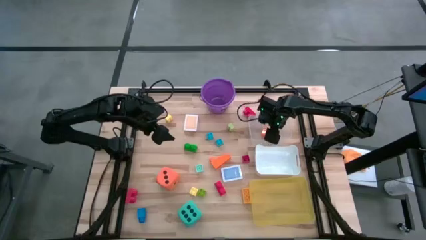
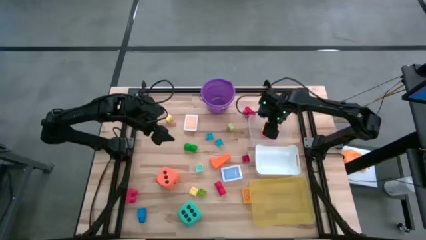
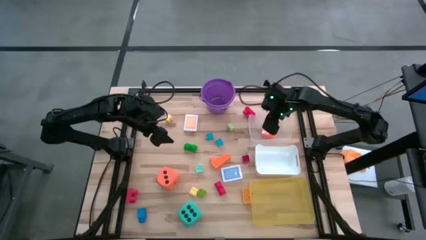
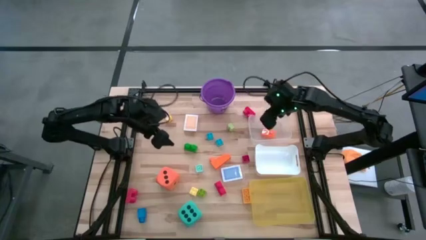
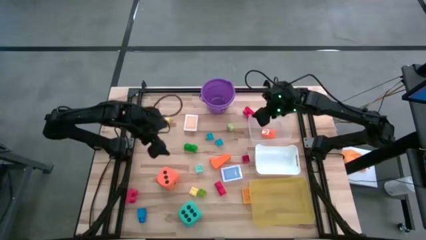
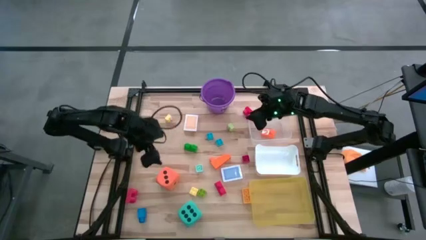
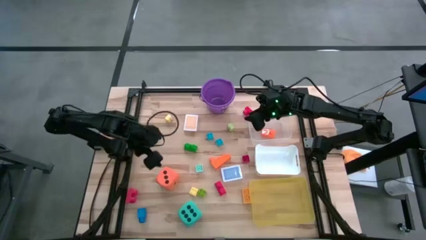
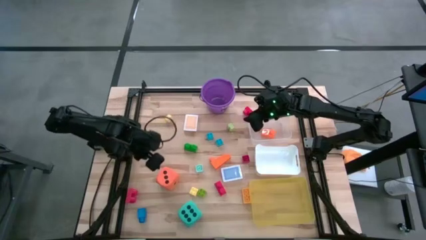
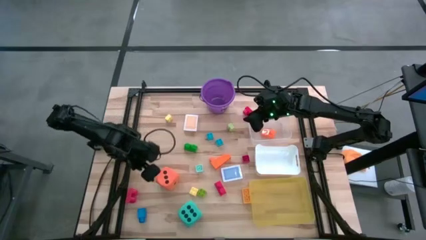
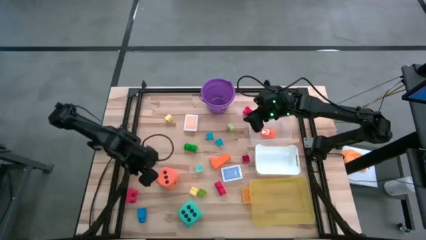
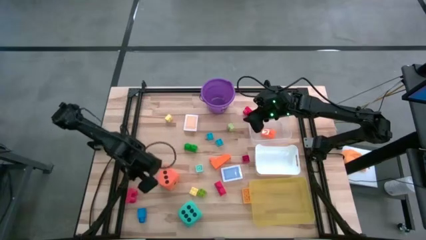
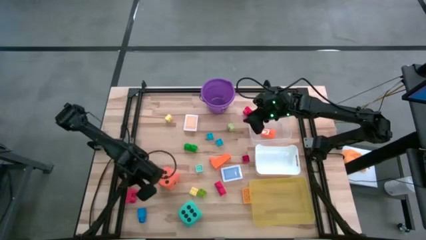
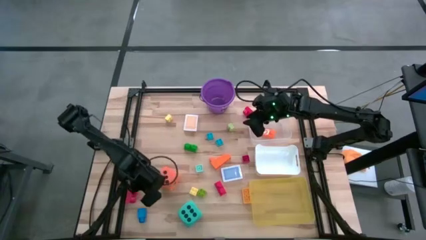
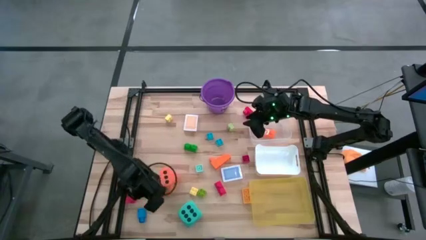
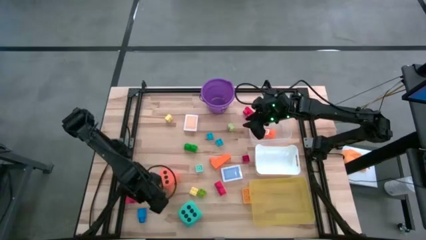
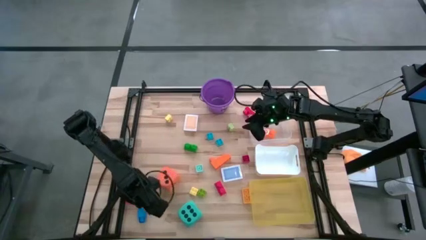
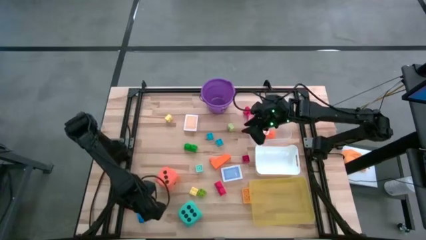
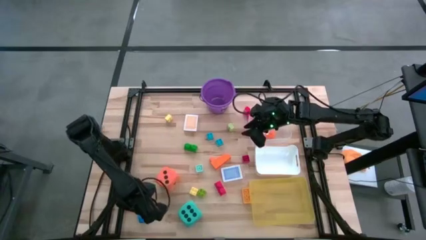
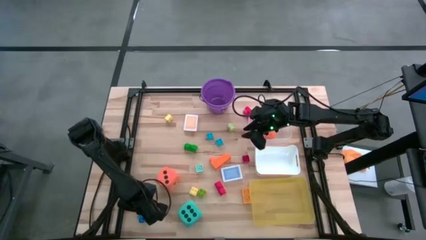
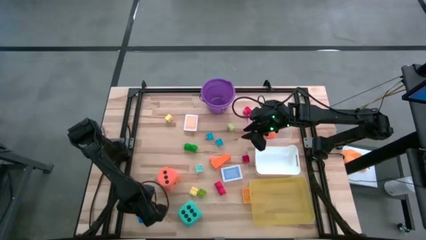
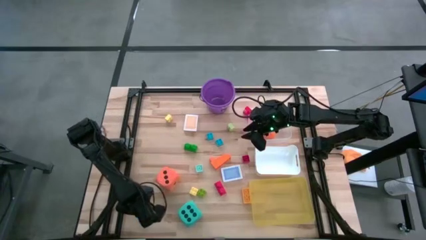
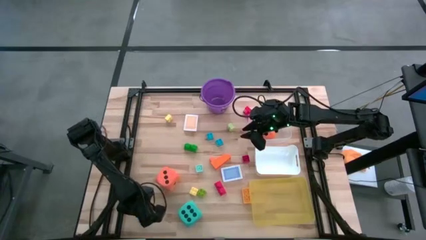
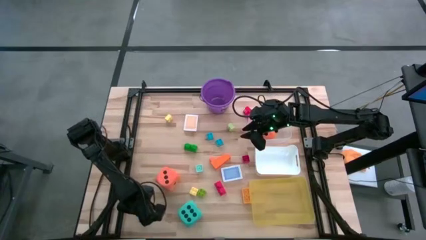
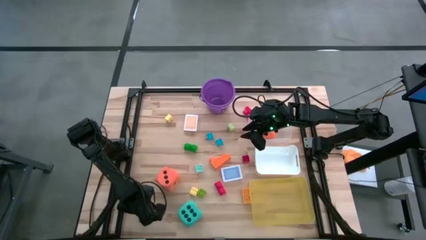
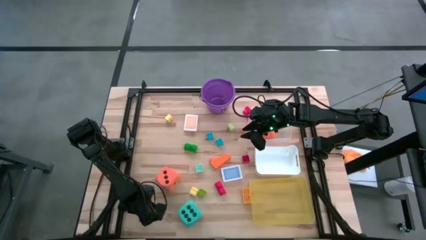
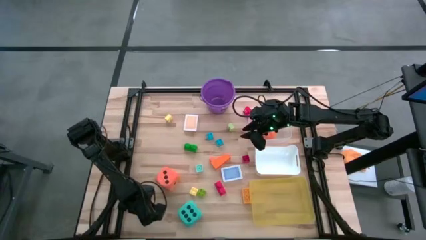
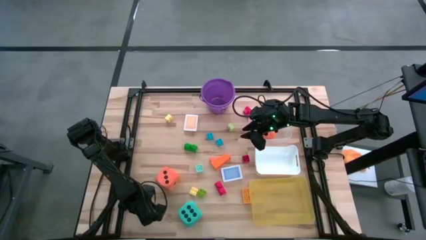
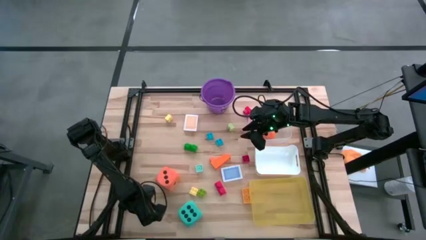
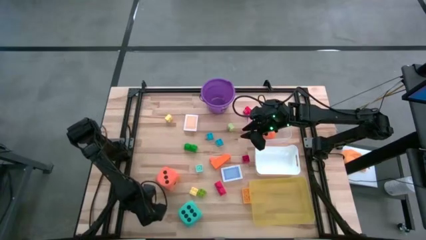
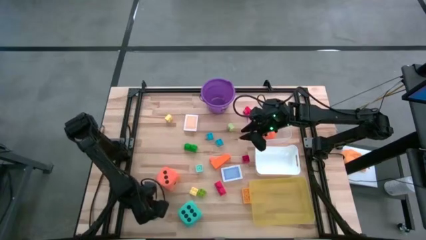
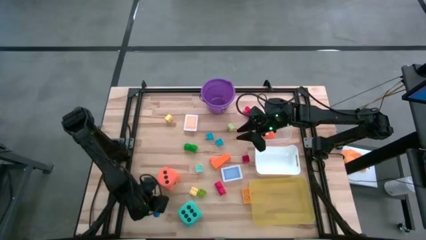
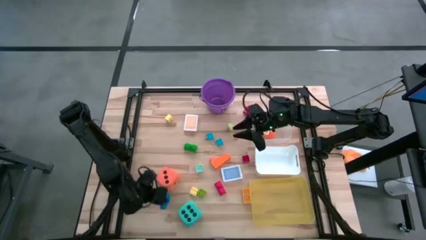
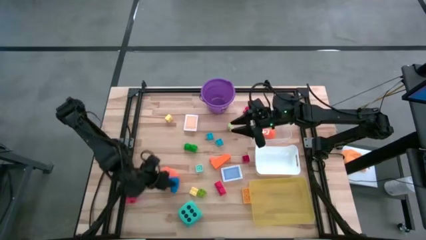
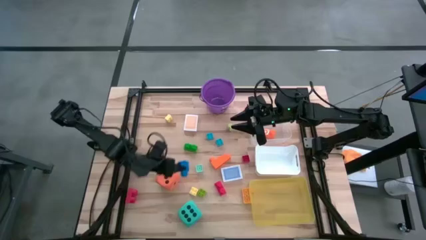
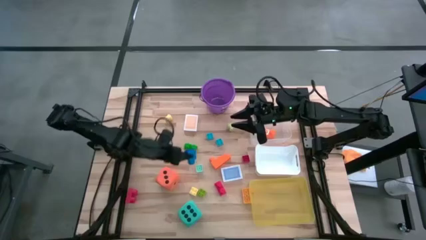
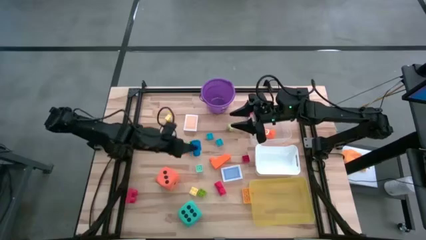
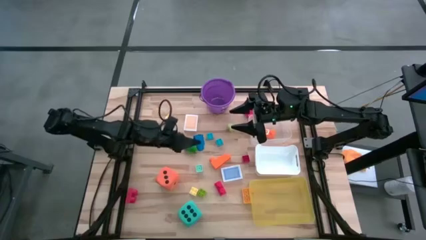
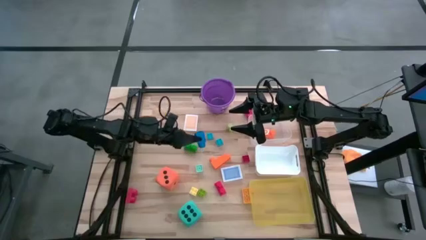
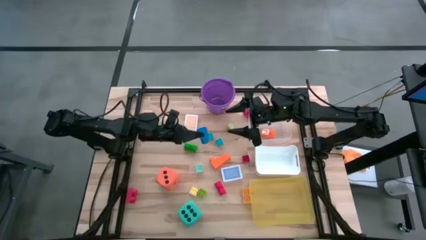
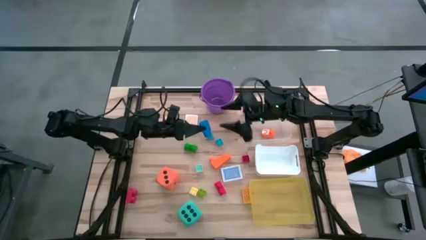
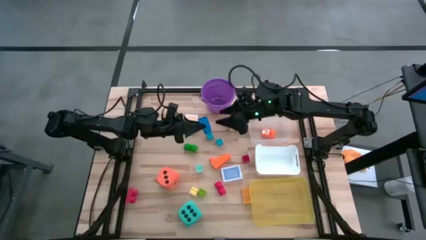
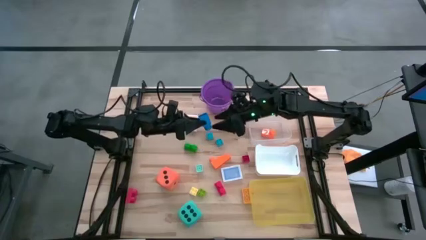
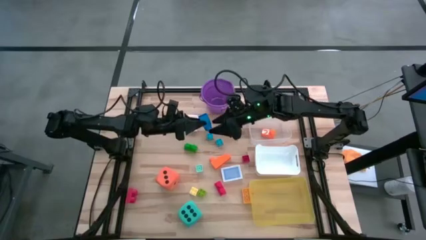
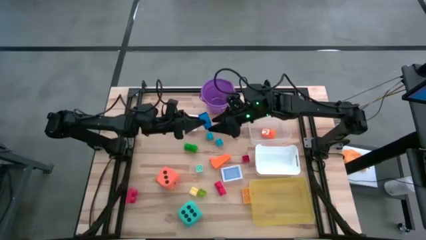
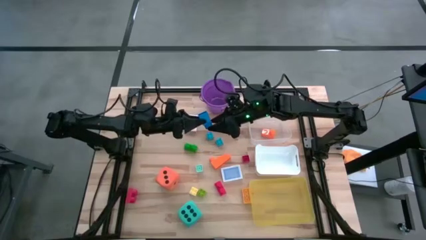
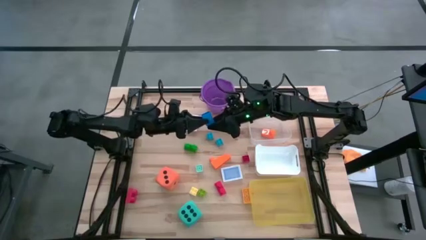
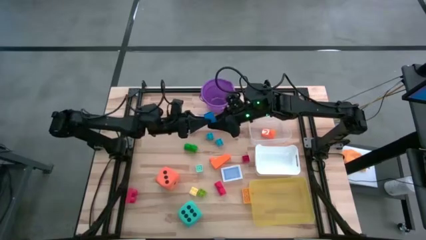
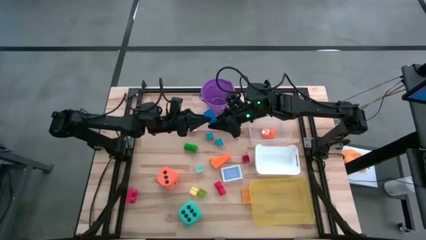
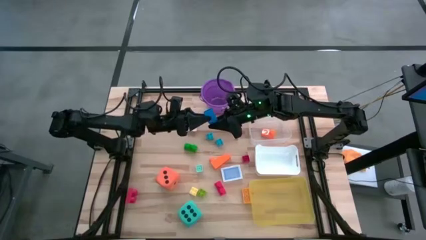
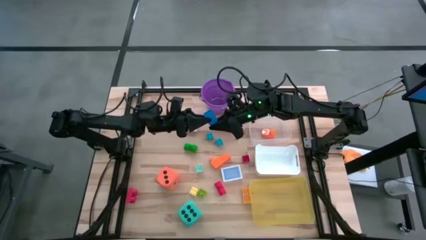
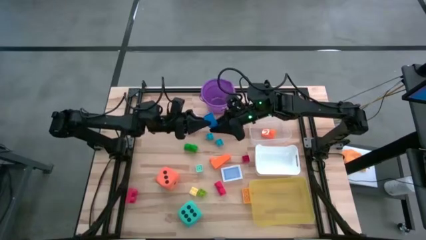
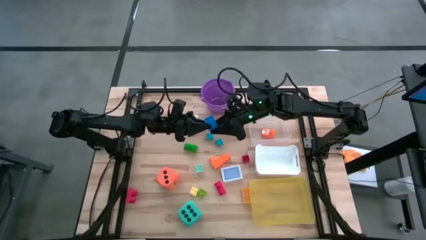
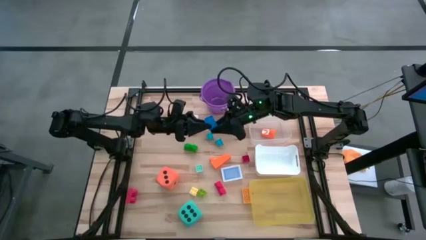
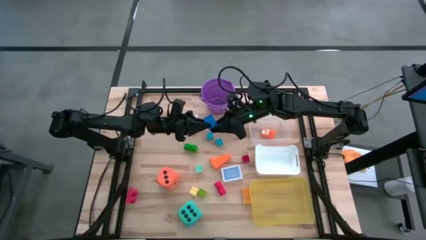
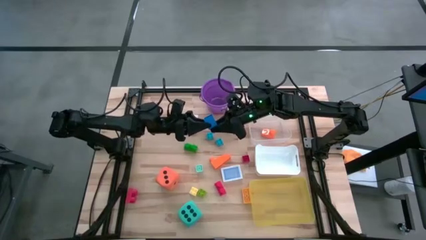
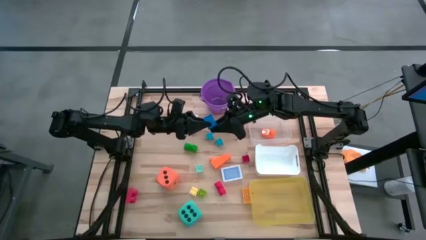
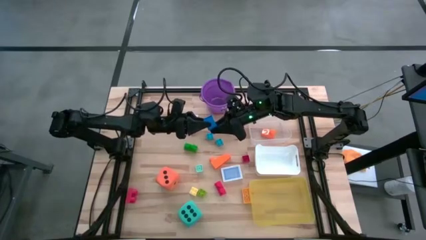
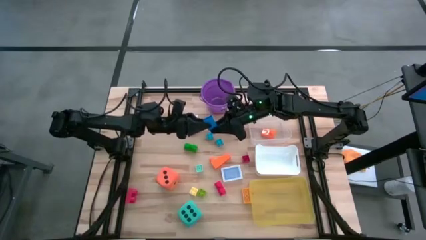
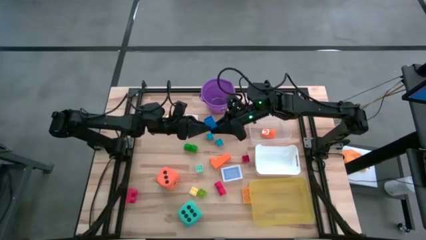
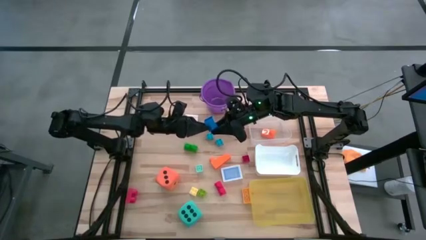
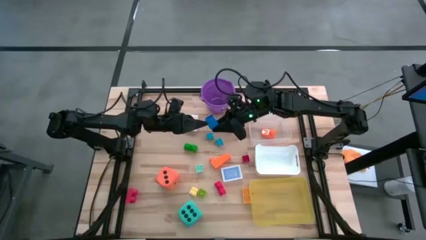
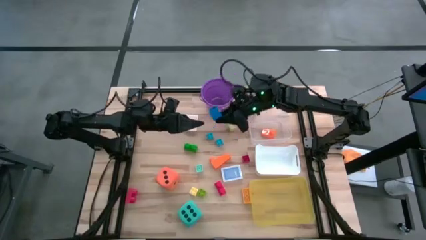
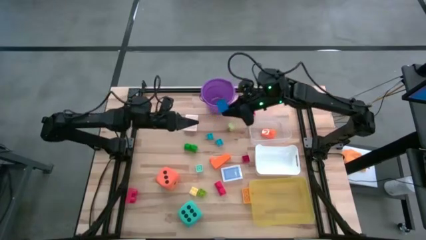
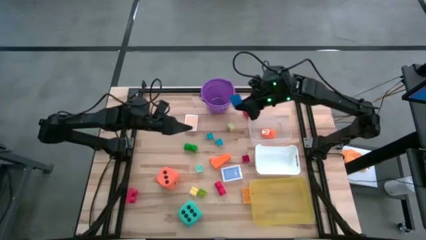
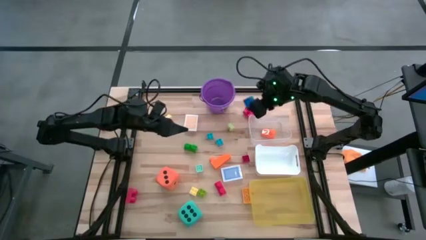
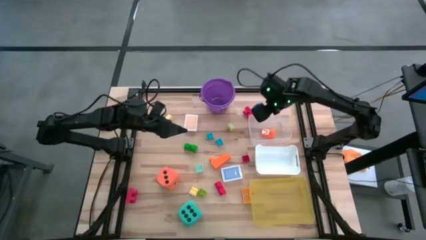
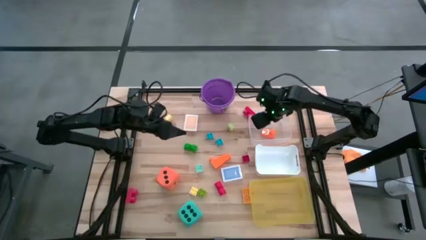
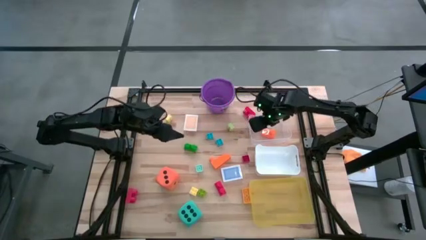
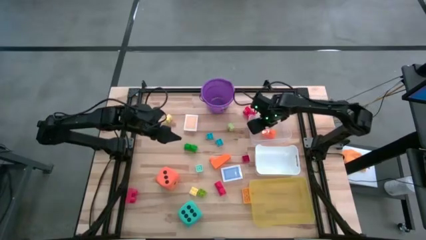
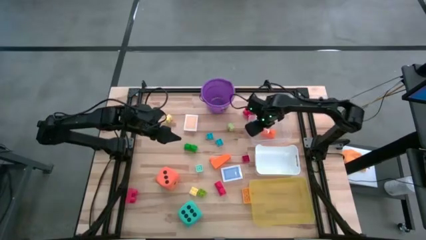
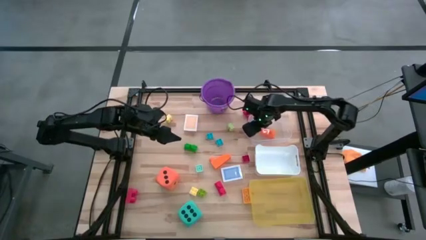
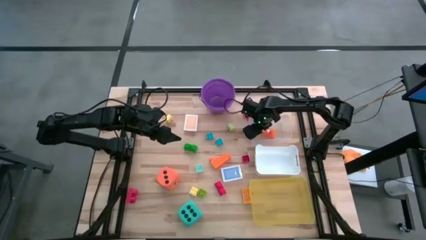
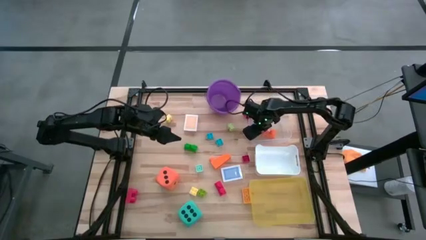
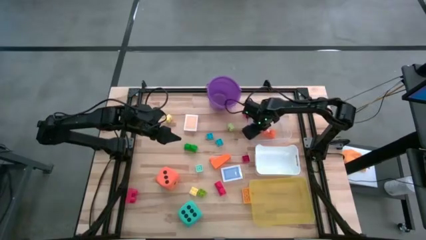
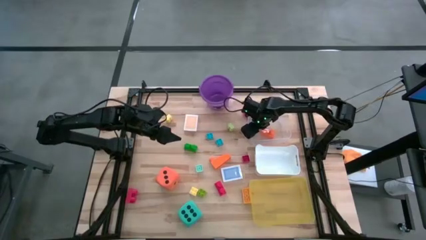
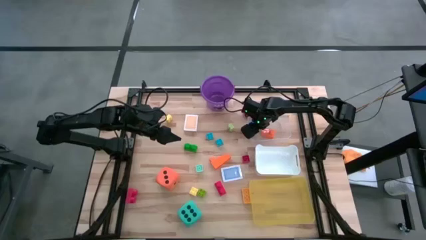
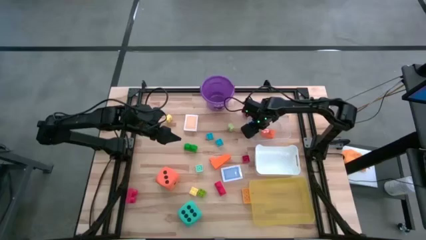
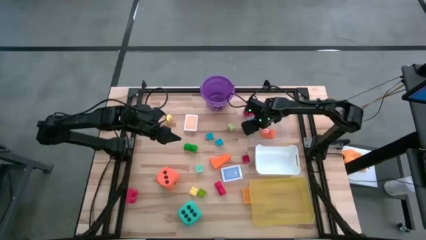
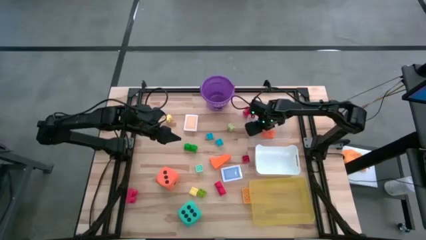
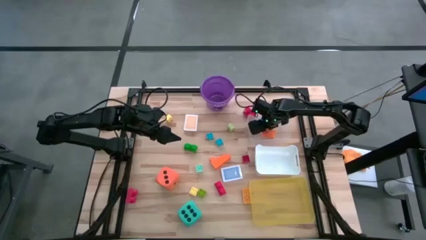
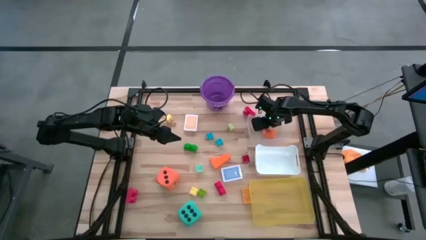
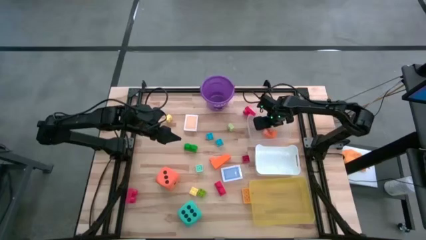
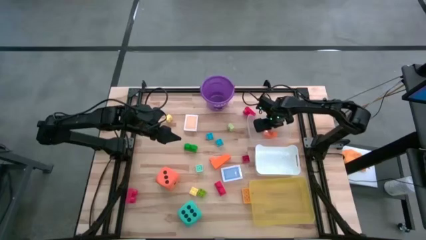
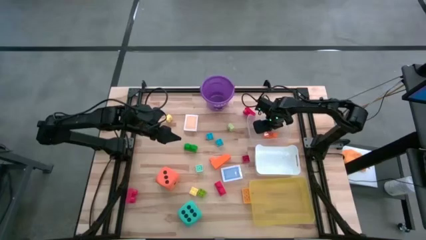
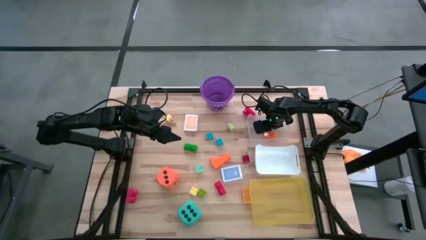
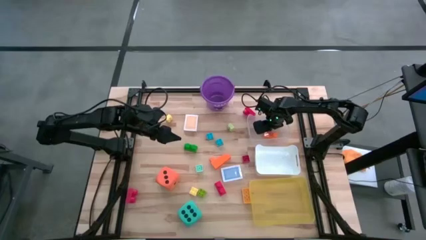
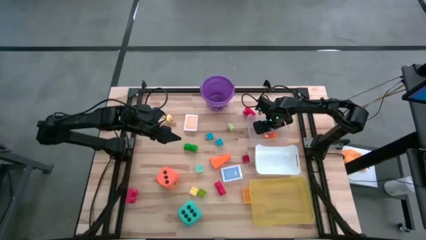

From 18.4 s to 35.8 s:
Task: Pick & Place Toys
Put the dark blue game piece into the transparent bin
